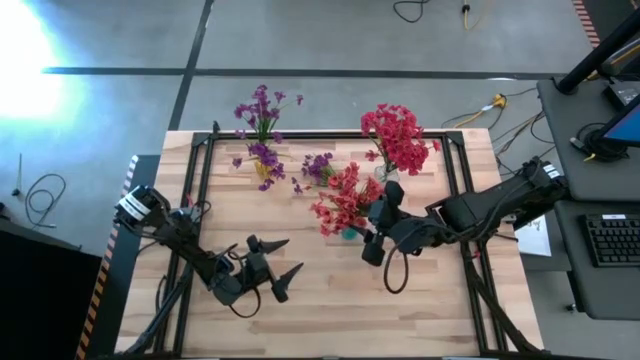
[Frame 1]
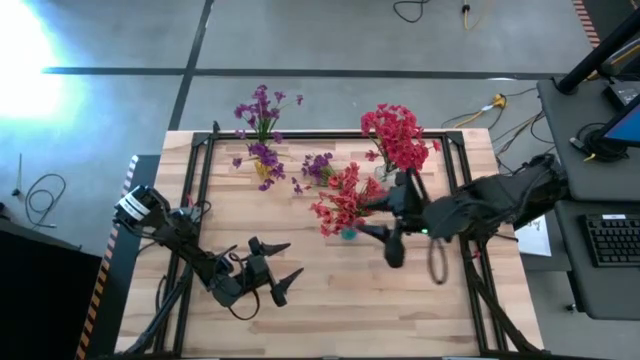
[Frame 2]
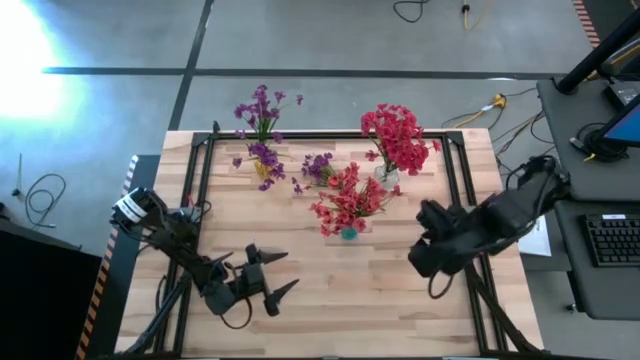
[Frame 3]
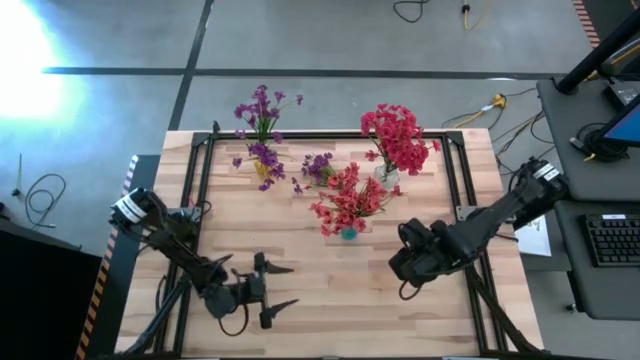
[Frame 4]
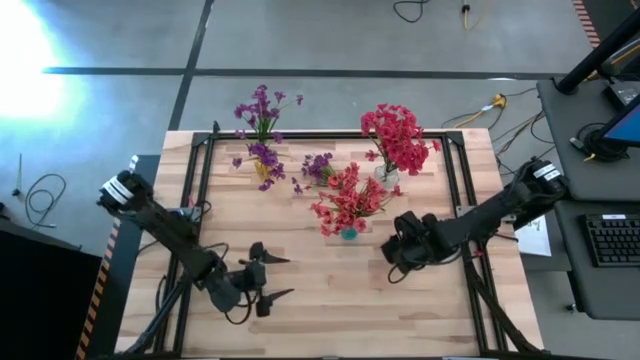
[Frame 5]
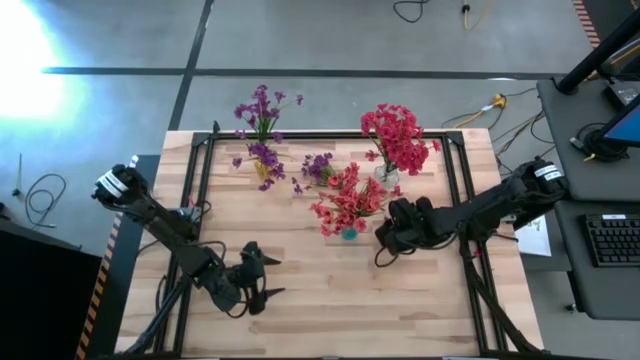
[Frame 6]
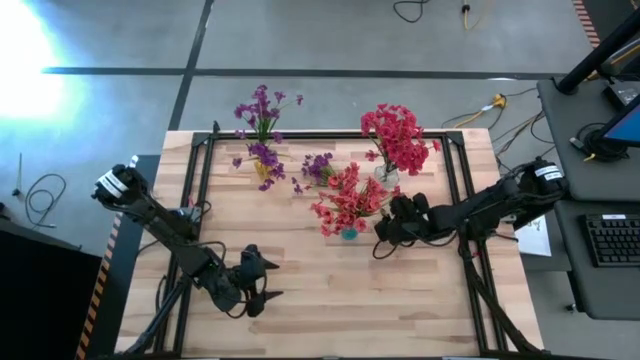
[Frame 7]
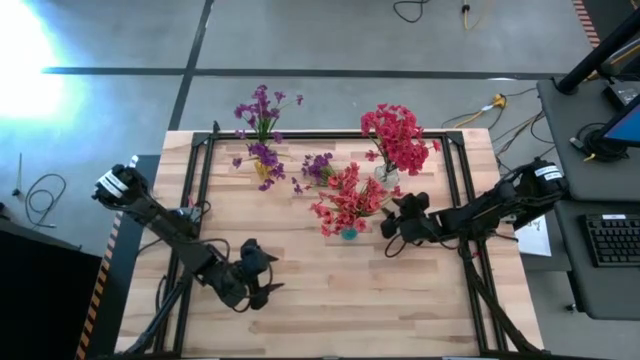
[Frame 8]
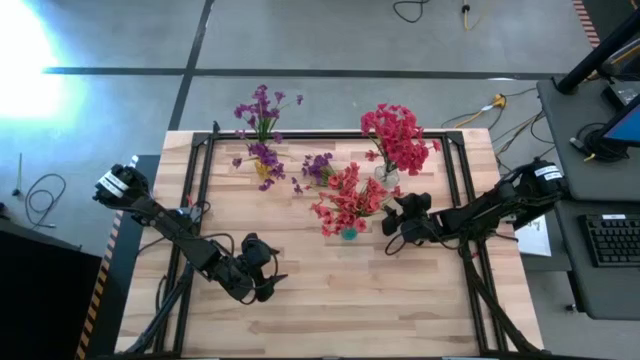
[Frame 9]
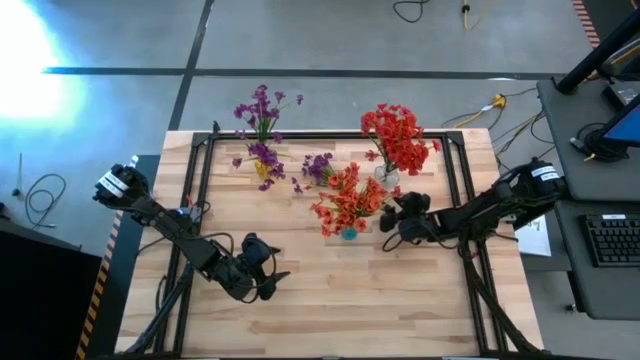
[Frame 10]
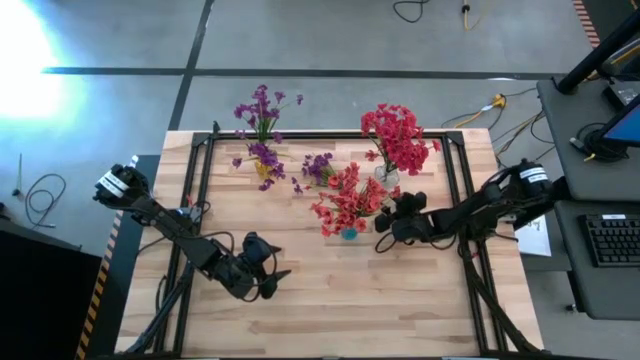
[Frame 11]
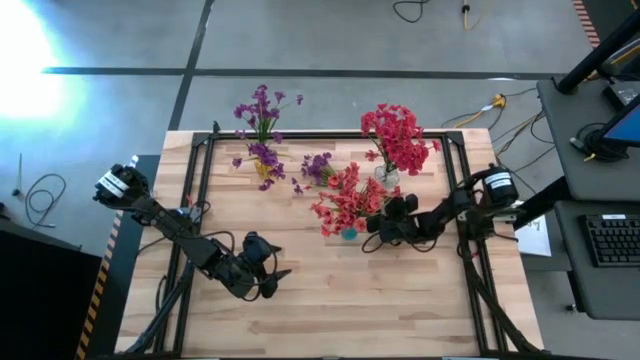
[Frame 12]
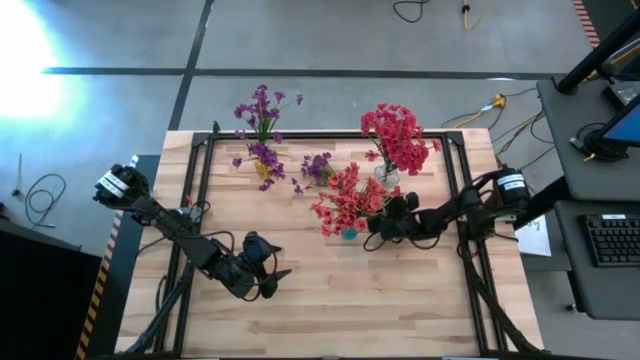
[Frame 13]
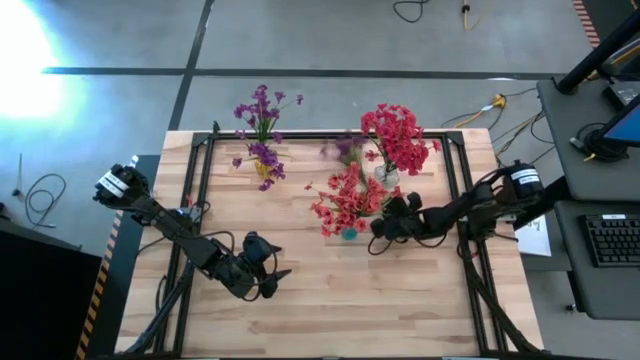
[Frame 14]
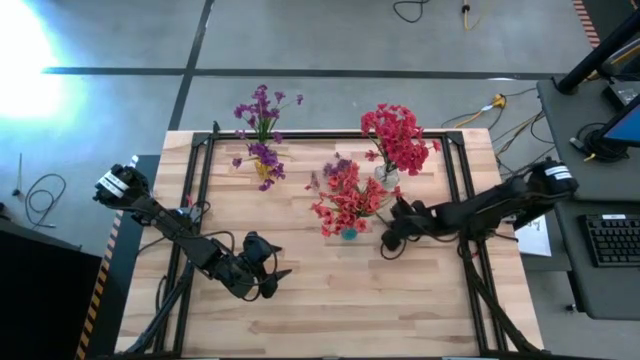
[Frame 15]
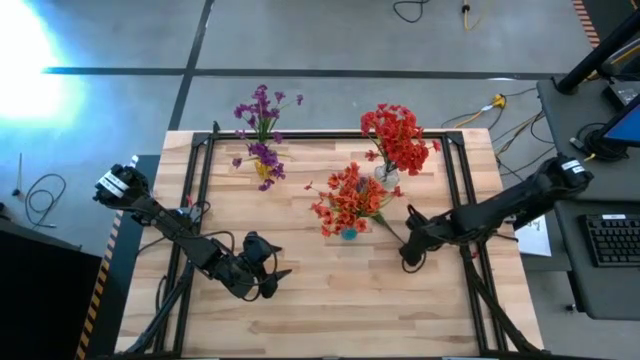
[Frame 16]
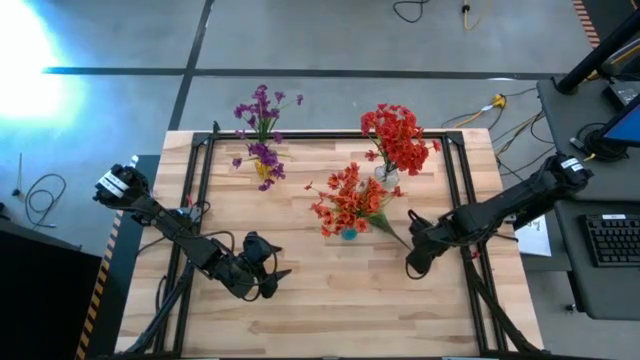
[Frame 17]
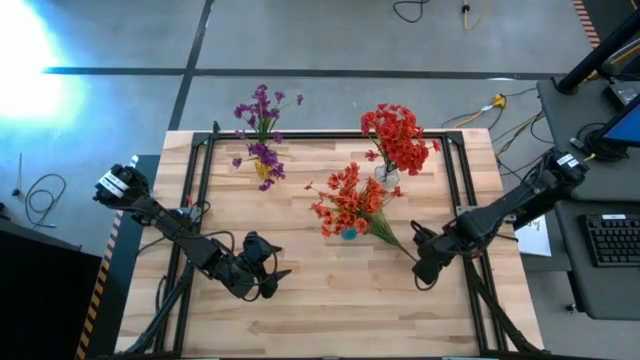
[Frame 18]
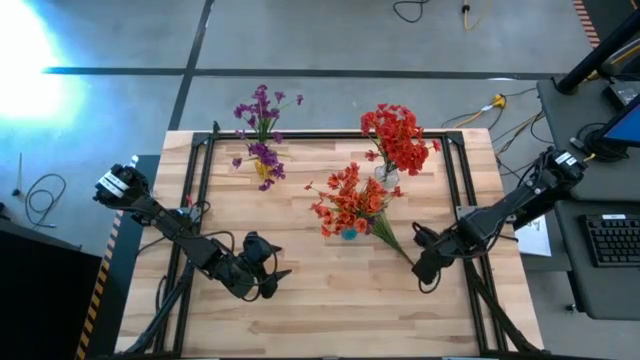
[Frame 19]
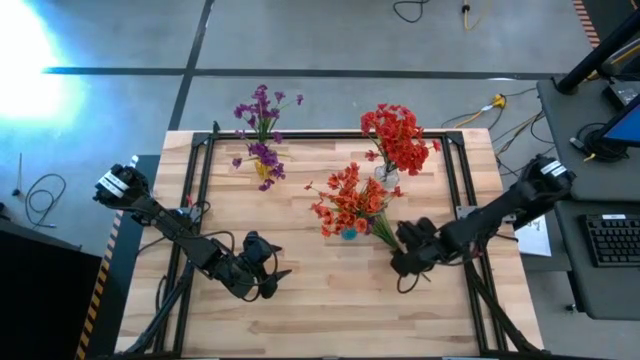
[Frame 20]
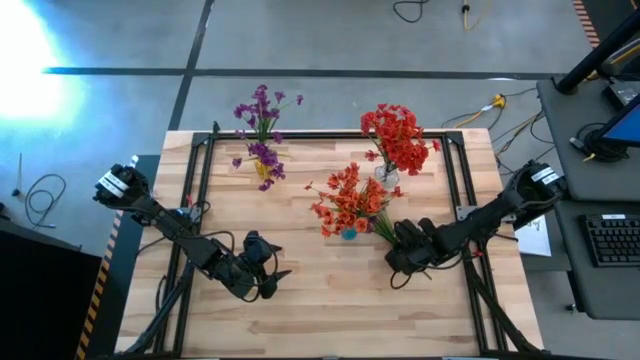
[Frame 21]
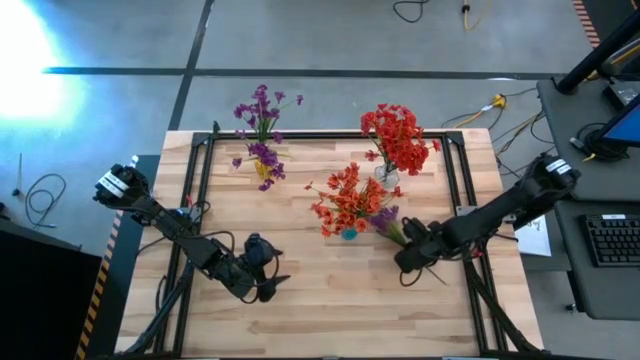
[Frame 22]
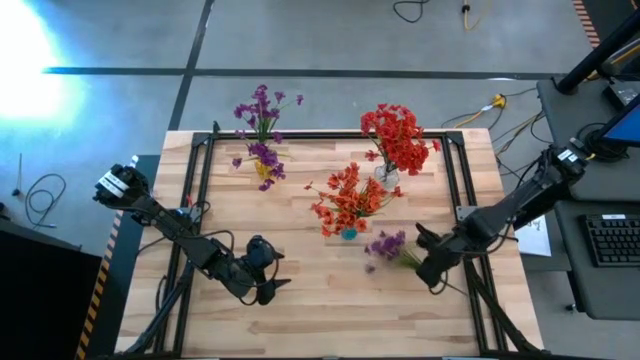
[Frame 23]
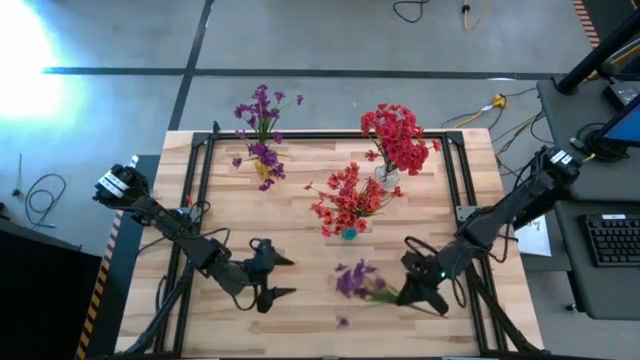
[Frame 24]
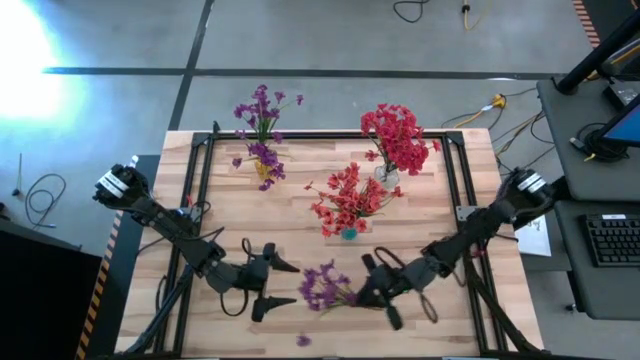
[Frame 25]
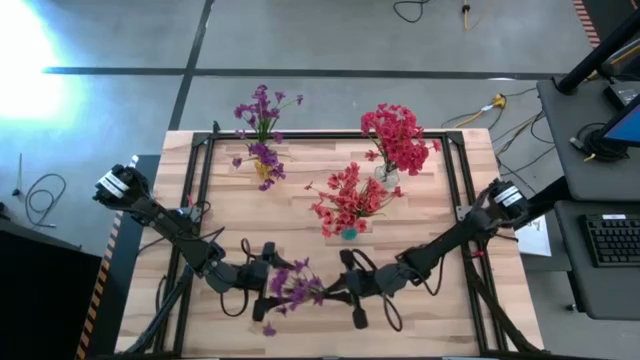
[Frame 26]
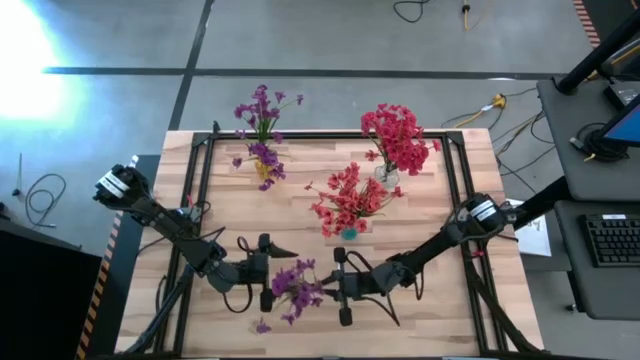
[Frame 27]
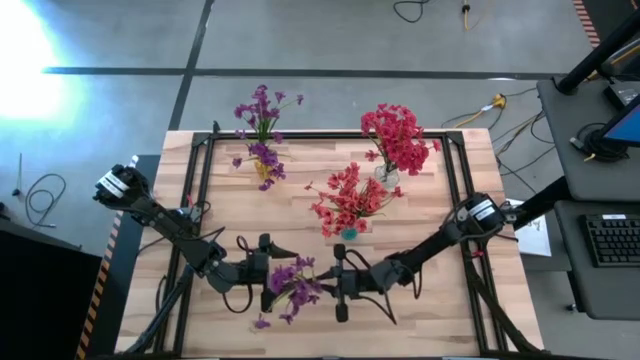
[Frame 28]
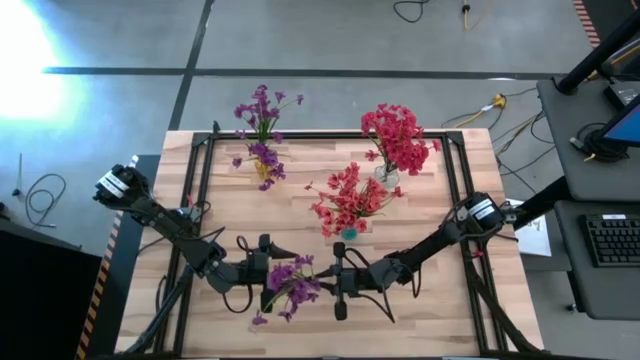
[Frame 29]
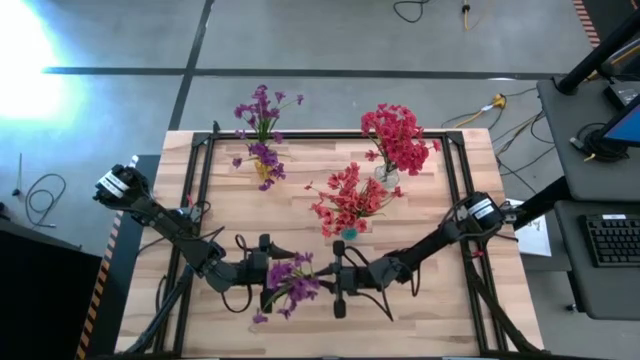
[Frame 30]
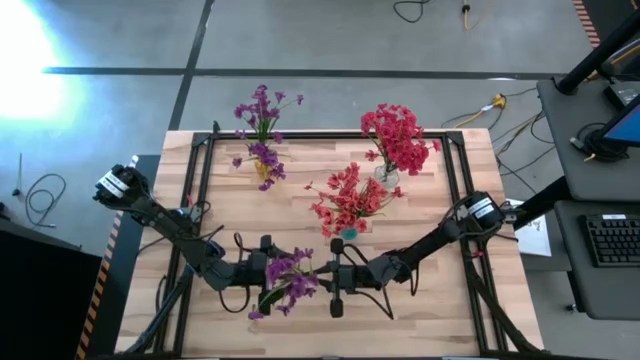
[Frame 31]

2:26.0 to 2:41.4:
Task: Sort flowers into vase by color
Put the violet flowers into the yellow vase

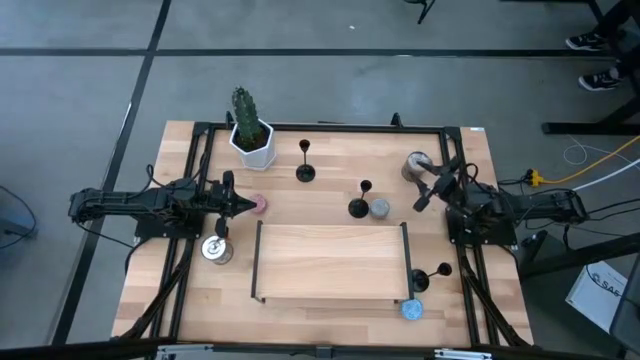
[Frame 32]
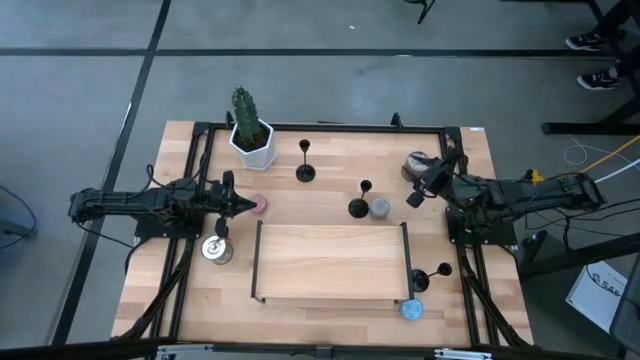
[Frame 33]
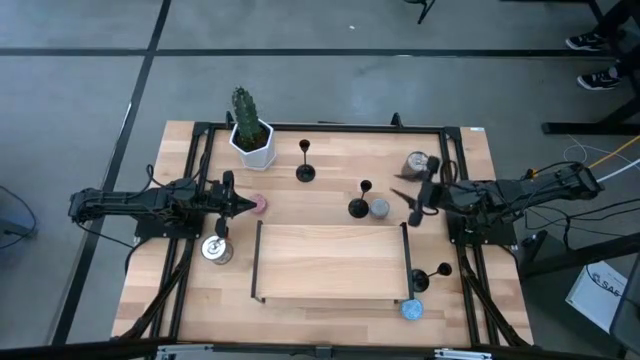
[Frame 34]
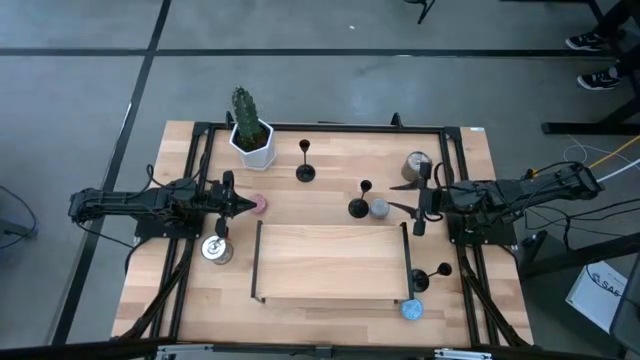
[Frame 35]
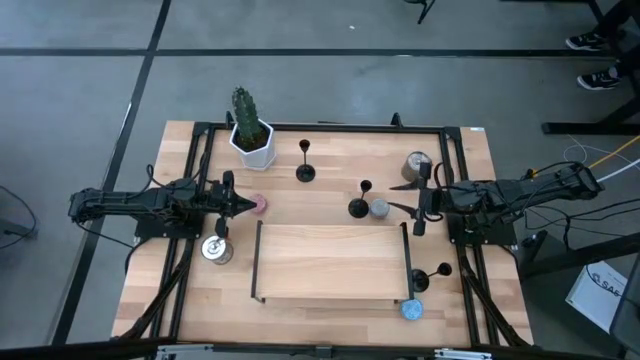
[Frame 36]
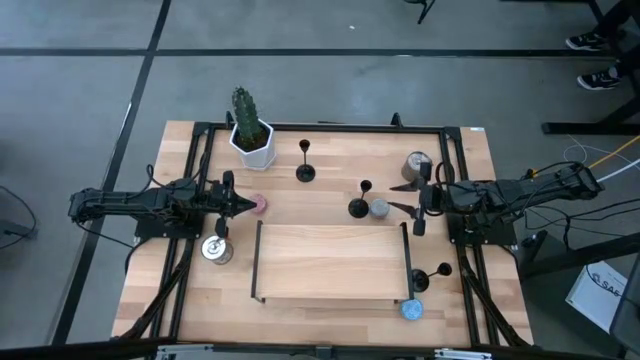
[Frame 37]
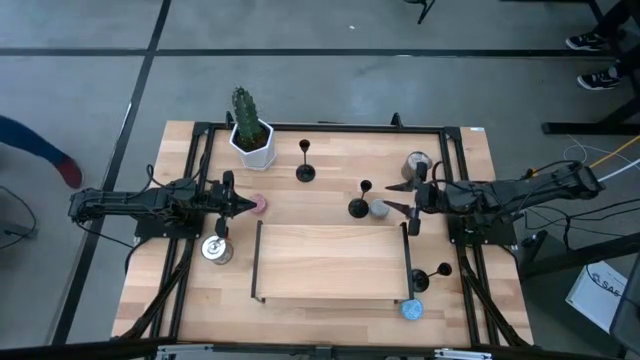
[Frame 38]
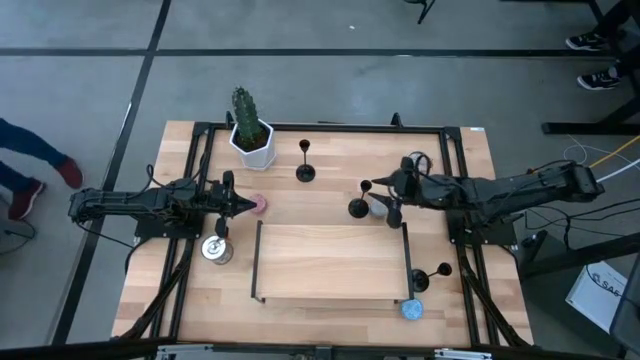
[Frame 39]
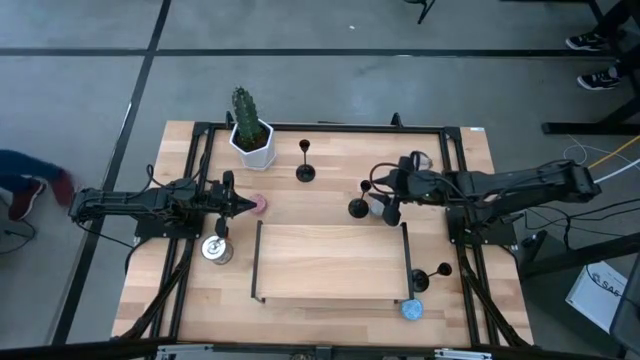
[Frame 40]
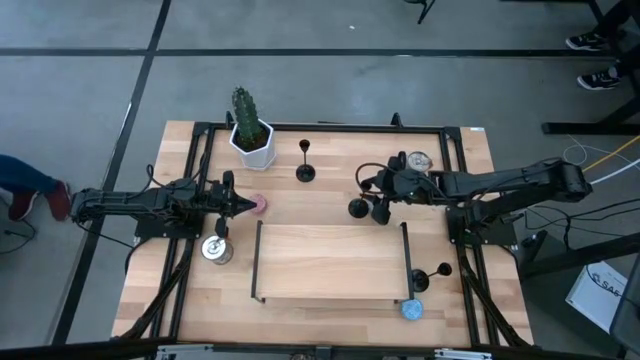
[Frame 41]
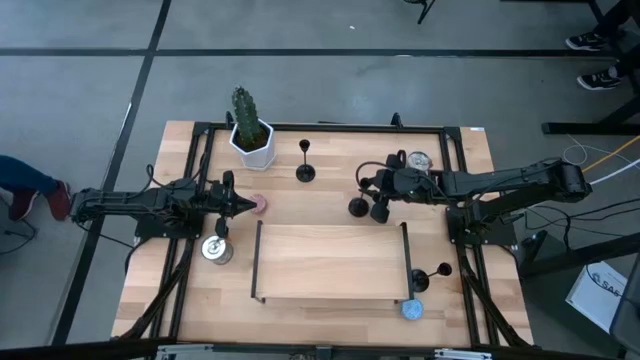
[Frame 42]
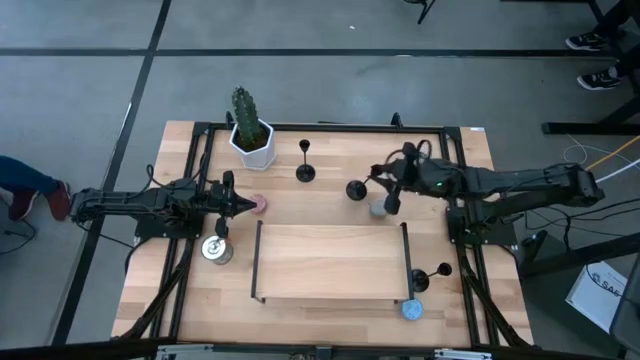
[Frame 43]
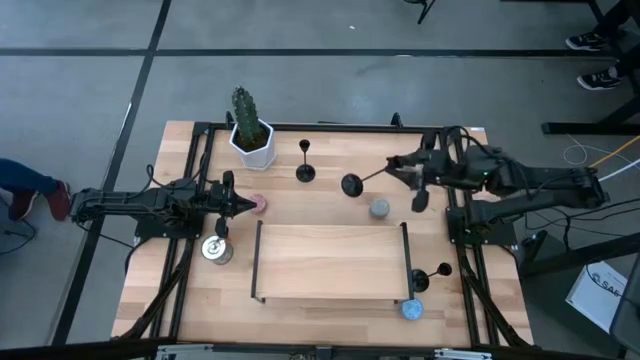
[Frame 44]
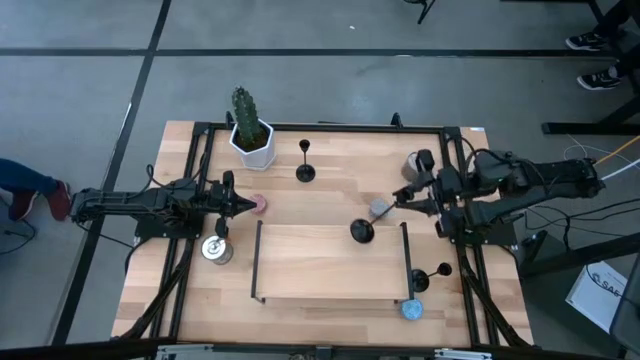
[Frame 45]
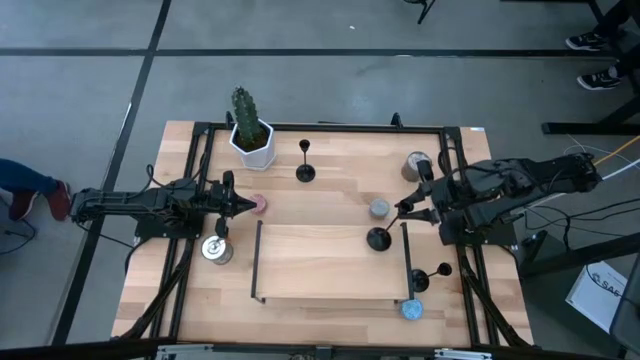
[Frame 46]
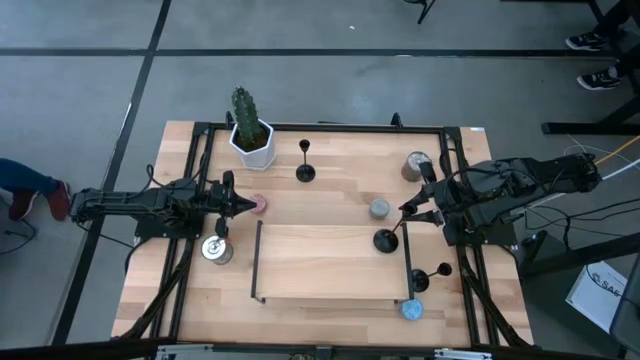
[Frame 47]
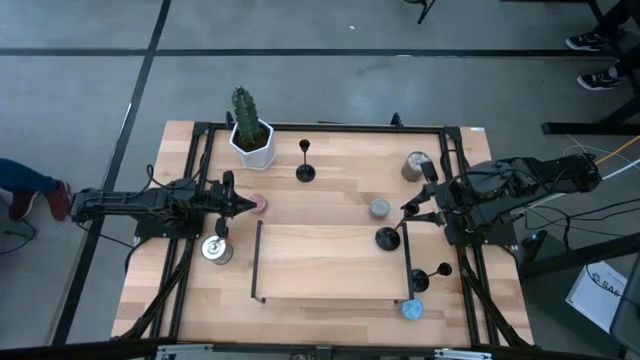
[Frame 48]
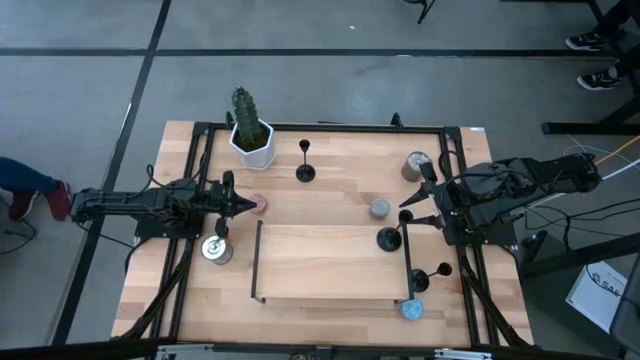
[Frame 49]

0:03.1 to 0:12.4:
Task: Pick & Place candle stick holders
Put the middle black candle holder on the shelf
